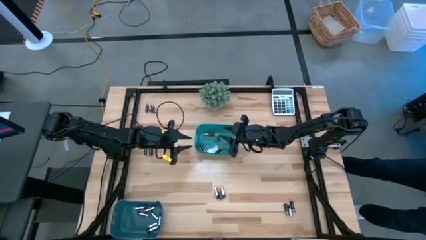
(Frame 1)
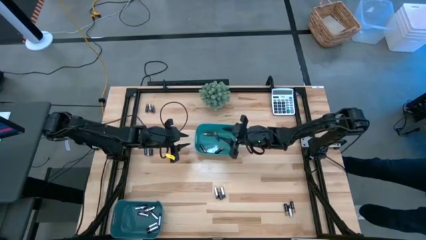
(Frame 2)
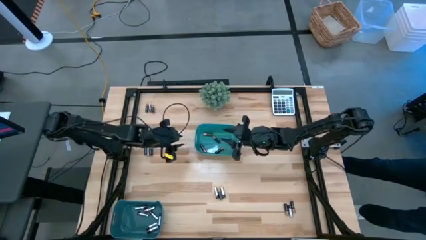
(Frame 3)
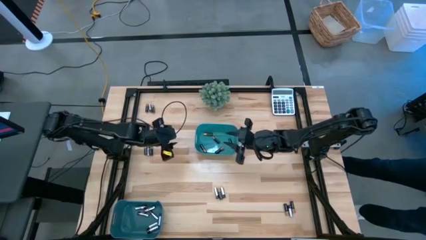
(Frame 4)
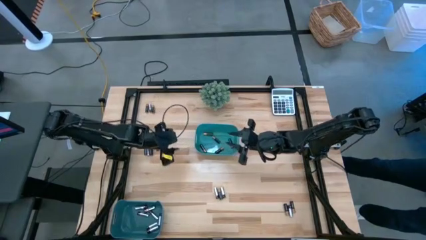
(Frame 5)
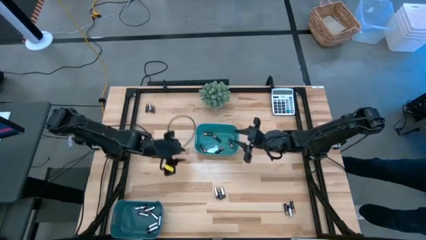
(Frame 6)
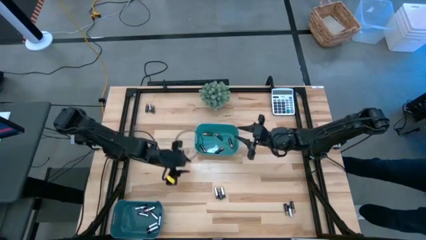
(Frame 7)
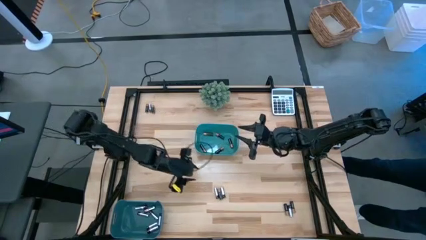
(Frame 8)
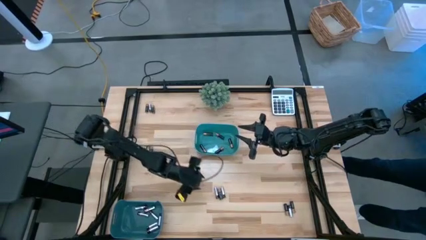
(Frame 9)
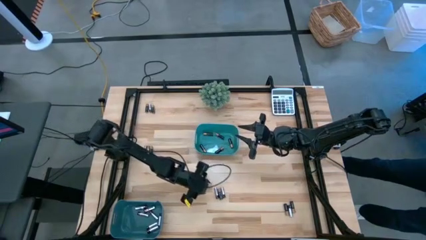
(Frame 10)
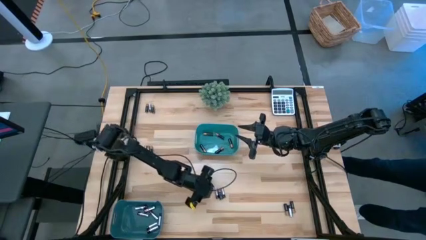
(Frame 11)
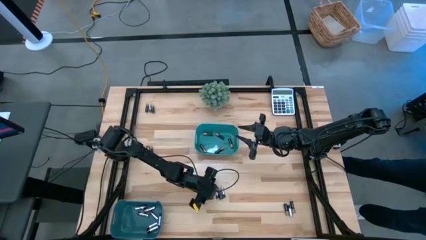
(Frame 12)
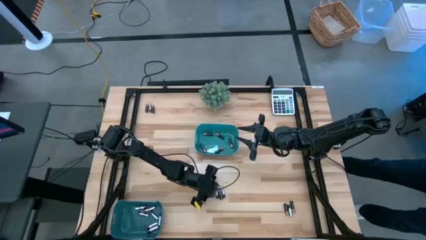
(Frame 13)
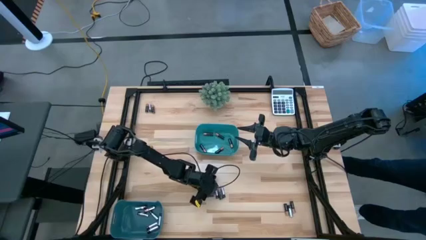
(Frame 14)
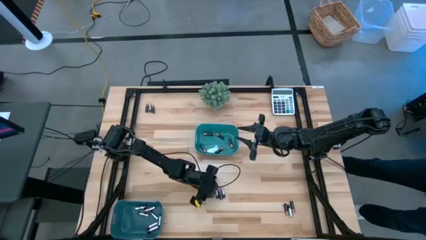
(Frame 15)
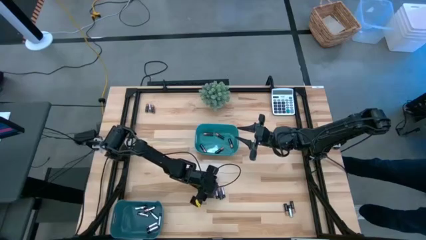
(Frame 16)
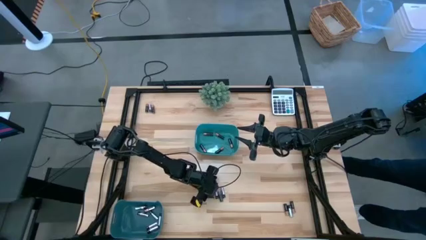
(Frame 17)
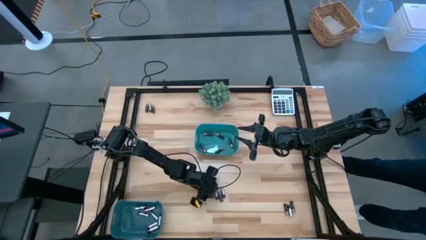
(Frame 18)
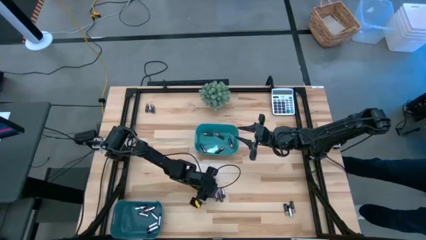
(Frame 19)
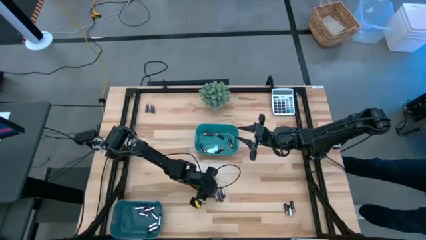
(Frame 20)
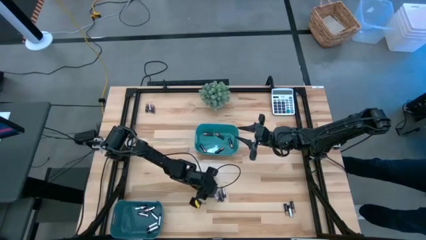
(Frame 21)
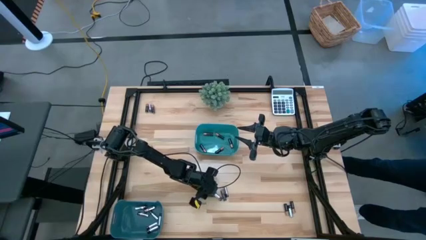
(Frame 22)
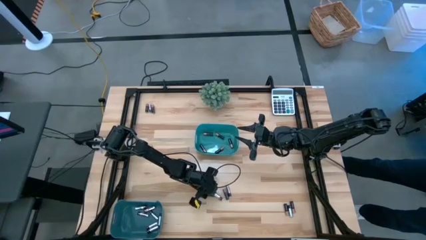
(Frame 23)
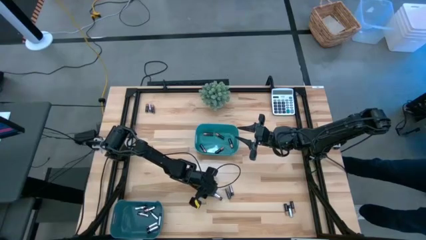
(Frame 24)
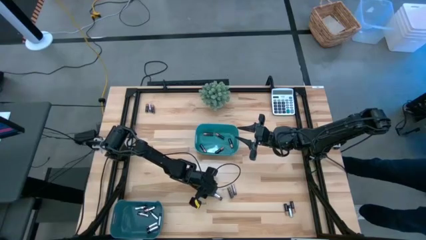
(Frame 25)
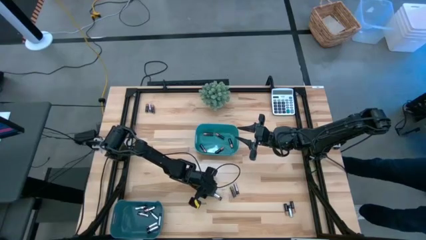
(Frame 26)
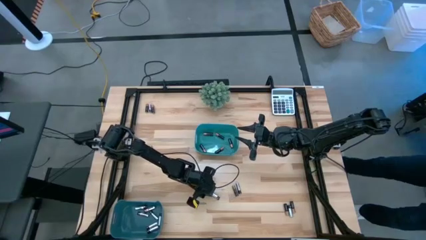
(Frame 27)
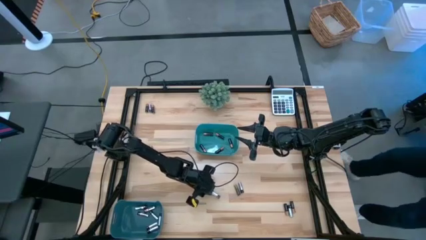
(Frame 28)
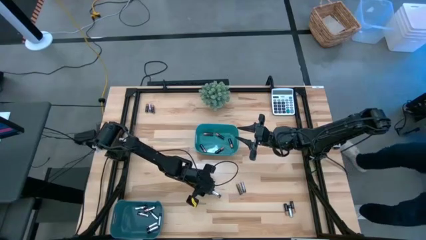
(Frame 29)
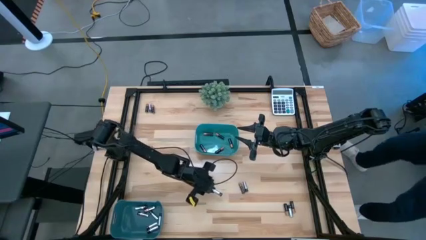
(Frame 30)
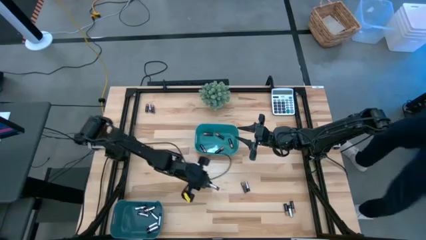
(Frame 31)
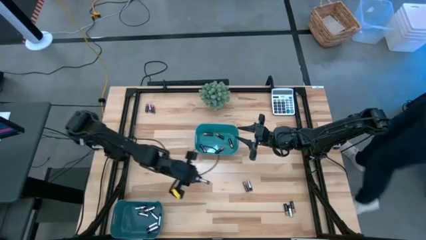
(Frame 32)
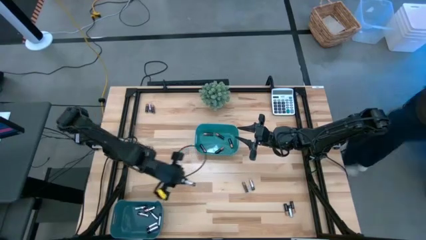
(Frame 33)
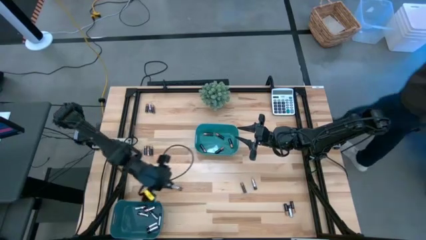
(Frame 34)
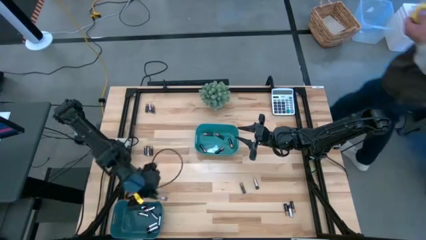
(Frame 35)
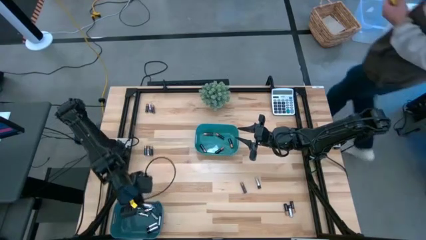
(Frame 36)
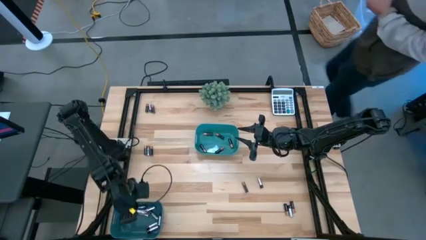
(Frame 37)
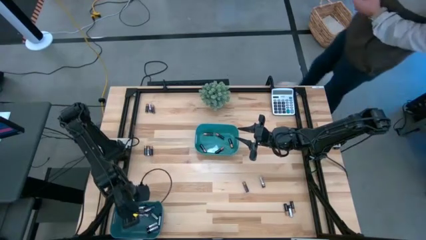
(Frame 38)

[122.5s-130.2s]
Task: Sort batteries
Put the silver battery into the blue bin

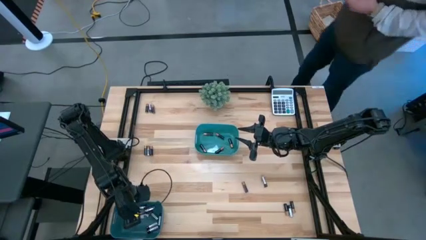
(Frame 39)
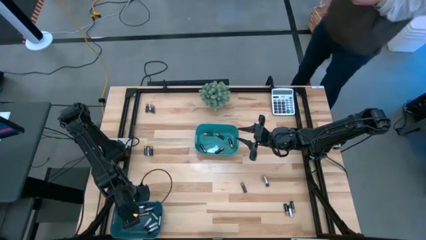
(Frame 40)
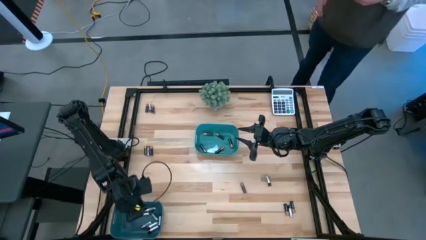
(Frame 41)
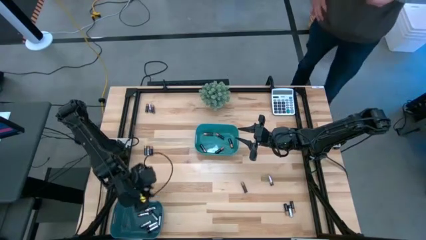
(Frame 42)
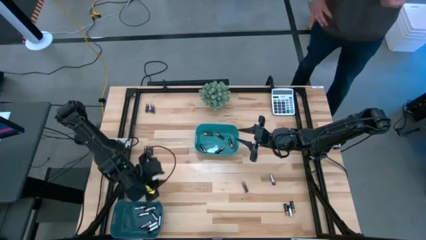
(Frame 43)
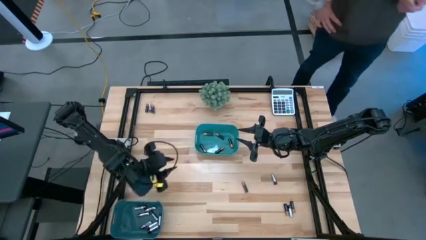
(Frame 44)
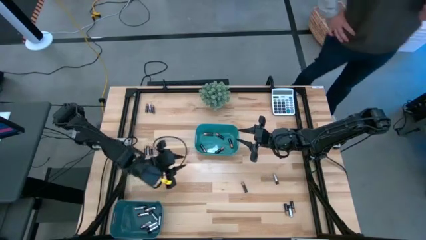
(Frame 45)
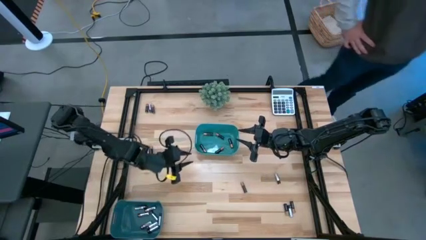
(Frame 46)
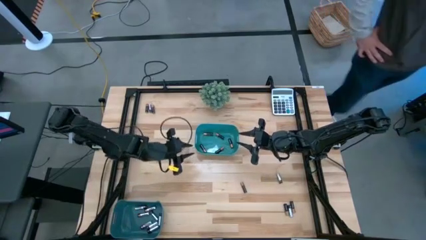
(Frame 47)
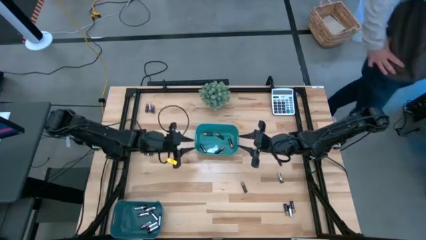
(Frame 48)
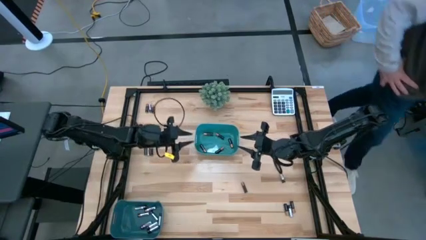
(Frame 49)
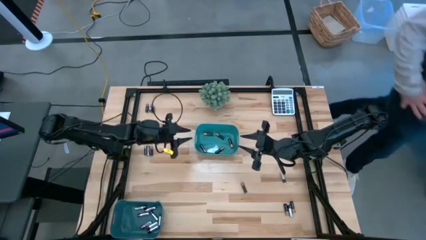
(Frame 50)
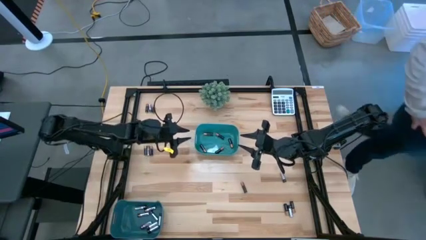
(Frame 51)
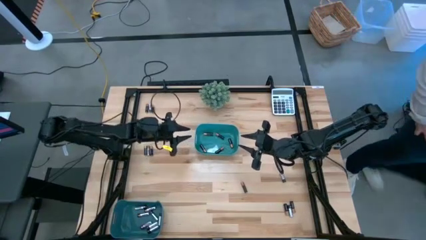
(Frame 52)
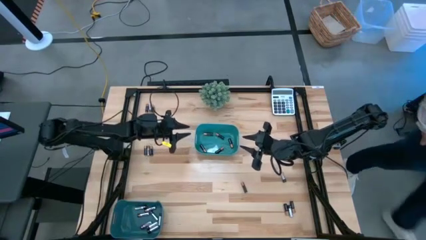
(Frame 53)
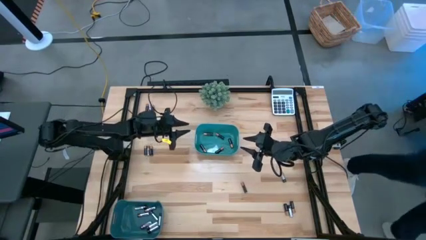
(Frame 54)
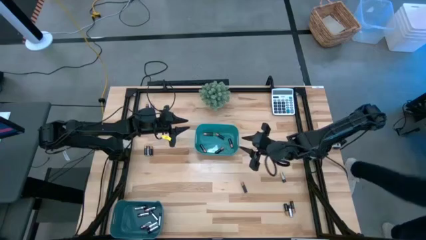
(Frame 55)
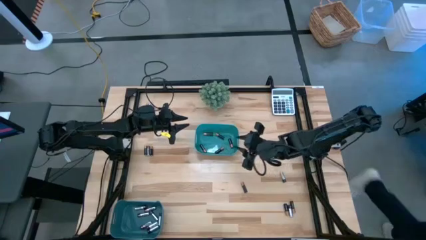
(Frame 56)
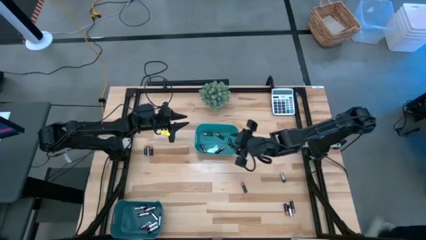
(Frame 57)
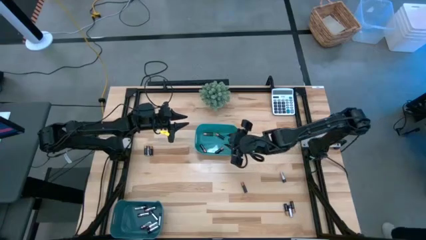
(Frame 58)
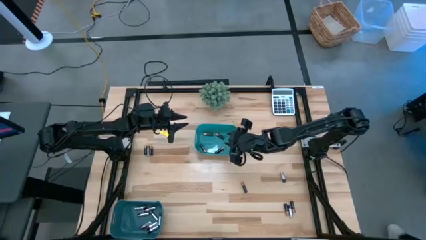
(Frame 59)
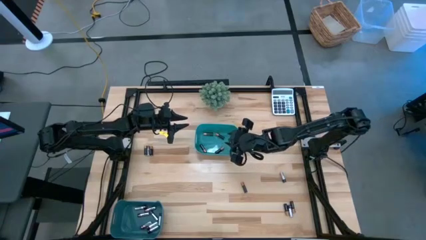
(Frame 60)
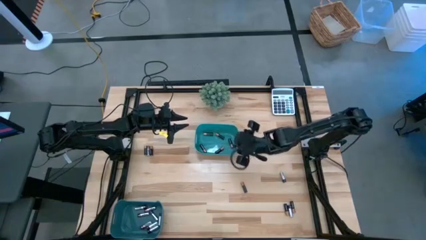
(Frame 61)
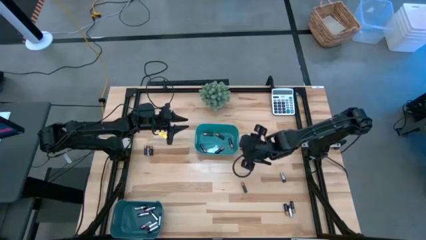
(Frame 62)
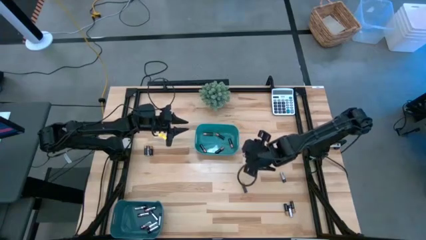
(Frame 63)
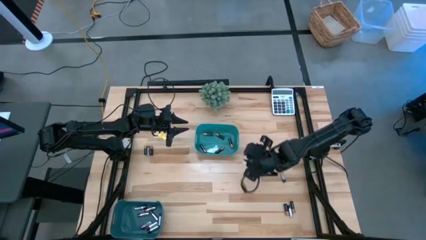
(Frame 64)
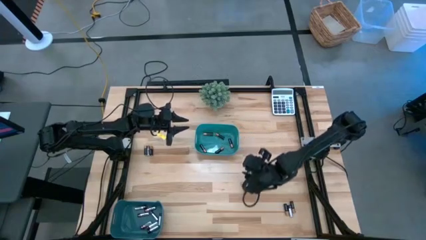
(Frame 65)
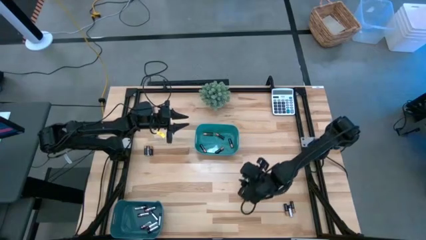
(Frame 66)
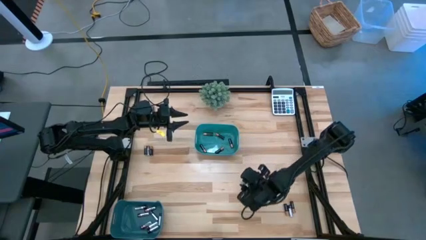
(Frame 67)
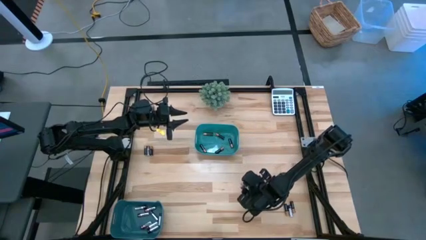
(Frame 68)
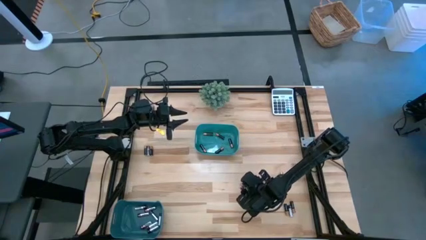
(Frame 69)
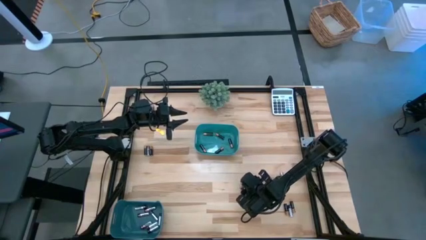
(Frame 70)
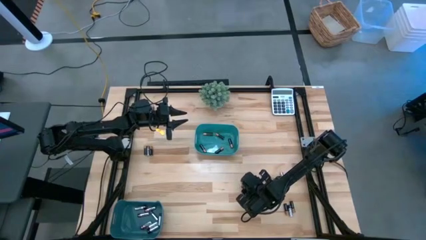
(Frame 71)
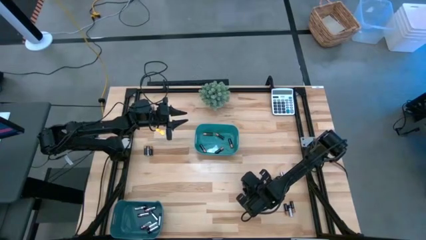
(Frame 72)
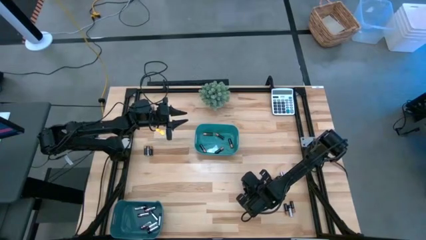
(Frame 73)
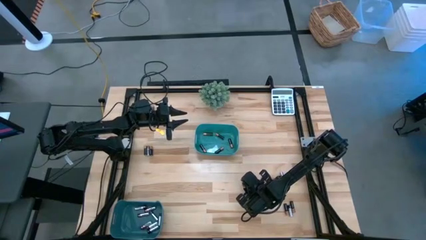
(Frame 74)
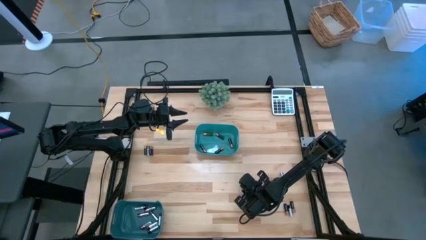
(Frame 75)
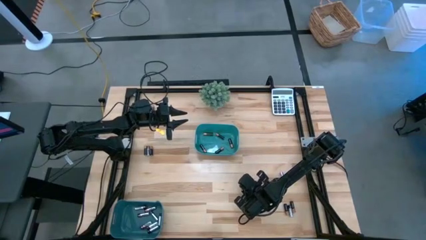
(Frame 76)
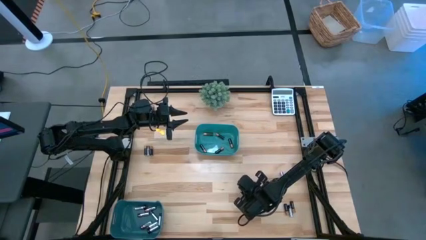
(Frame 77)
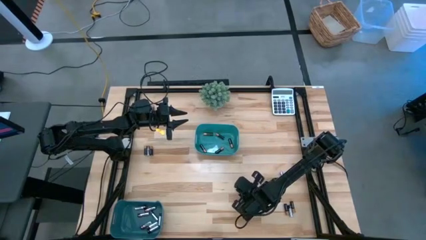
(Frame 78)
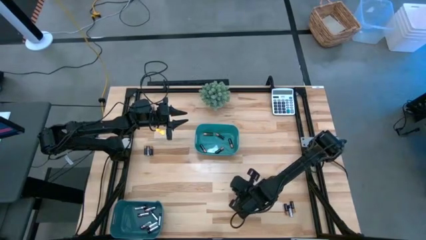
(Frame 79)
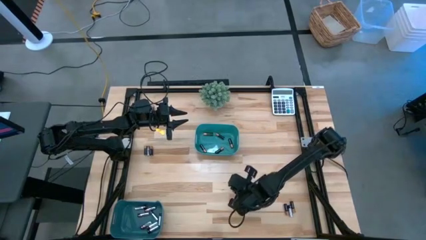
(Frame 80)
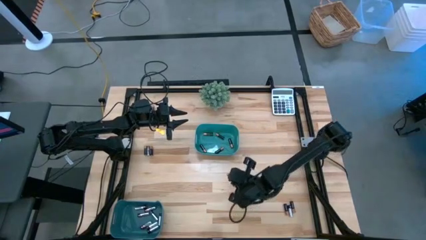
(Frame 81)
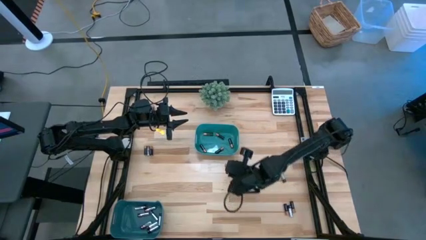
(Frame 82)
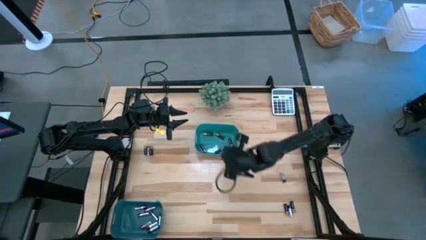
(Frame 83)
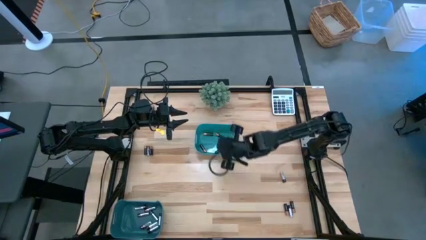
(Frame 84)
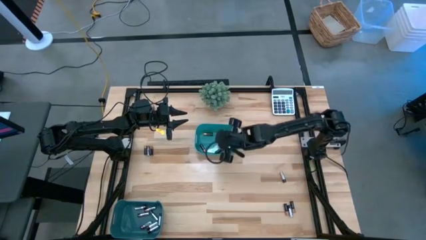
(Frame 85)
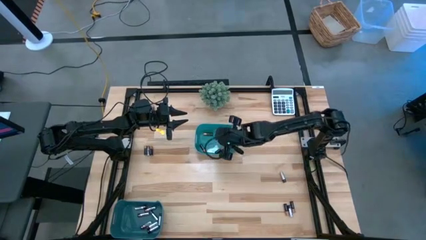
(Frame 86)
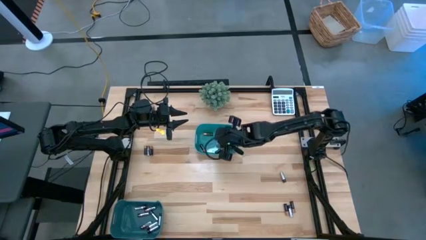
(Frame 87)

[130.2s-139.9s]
Put the black battery into the green bin
